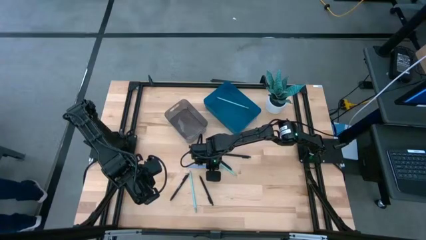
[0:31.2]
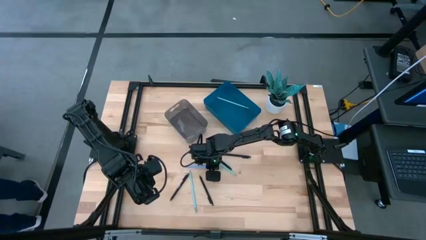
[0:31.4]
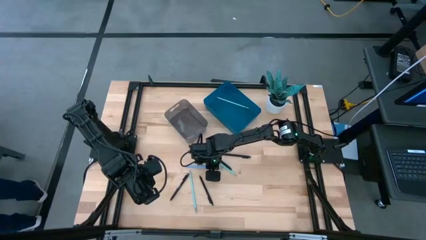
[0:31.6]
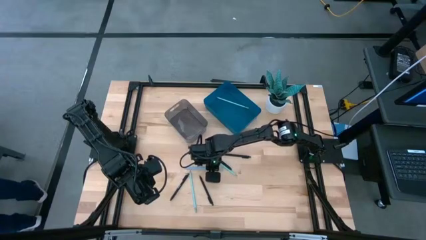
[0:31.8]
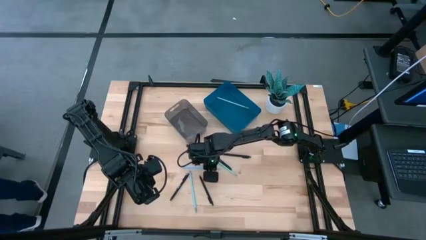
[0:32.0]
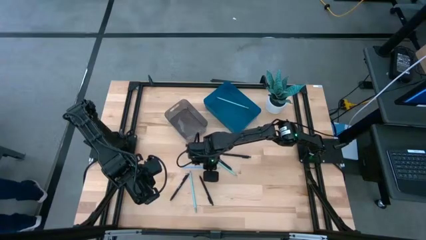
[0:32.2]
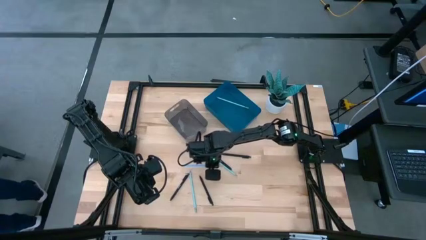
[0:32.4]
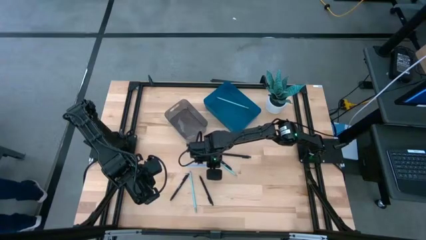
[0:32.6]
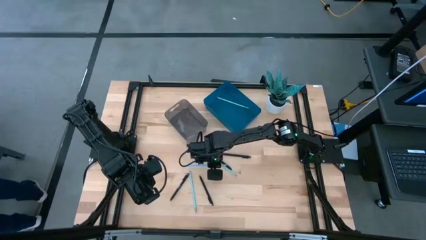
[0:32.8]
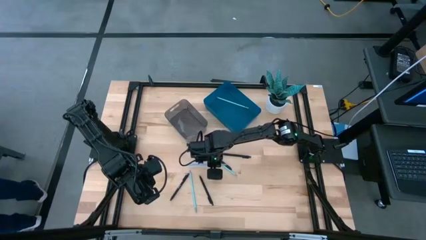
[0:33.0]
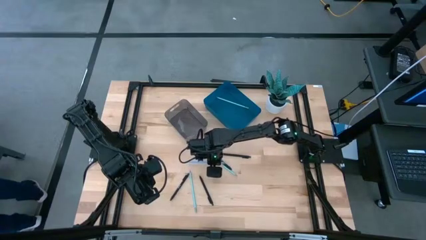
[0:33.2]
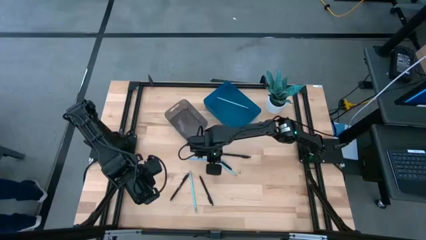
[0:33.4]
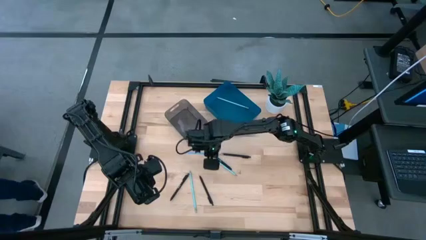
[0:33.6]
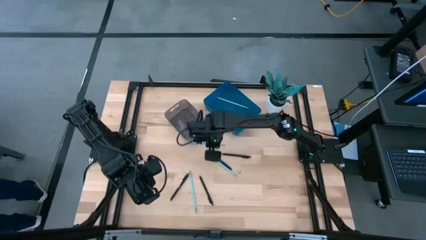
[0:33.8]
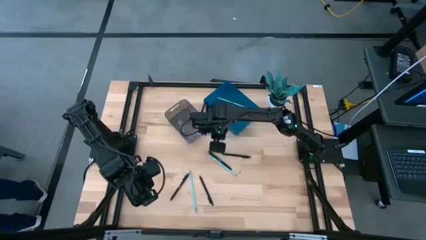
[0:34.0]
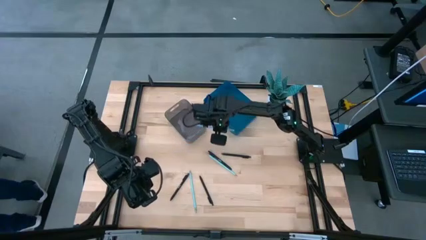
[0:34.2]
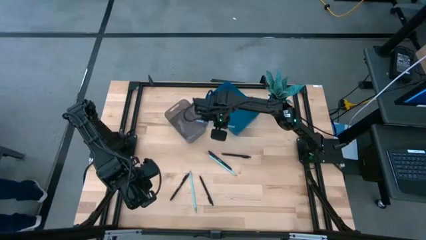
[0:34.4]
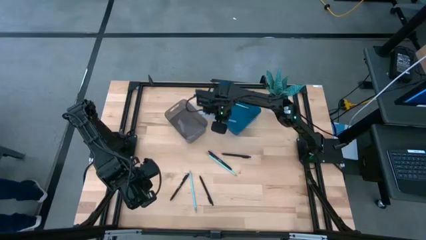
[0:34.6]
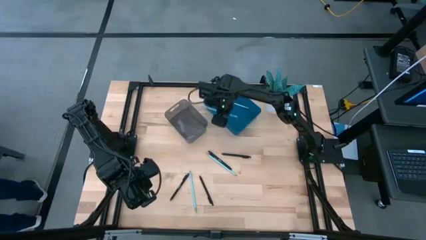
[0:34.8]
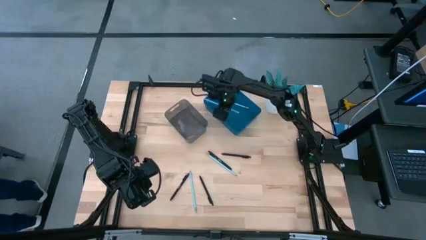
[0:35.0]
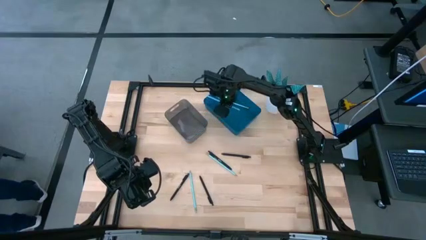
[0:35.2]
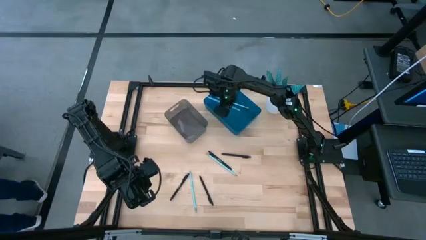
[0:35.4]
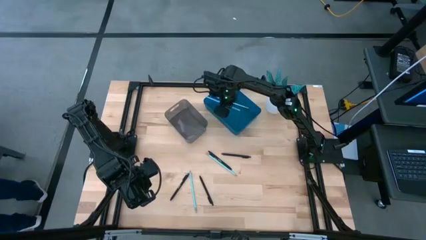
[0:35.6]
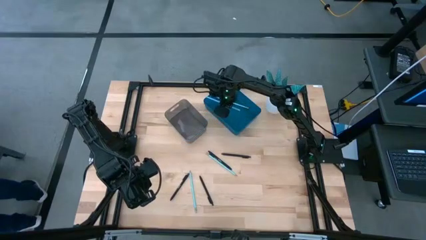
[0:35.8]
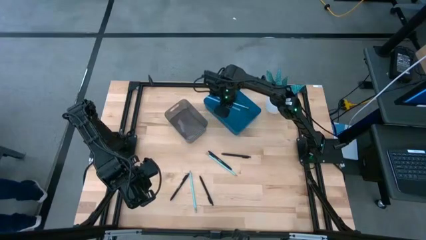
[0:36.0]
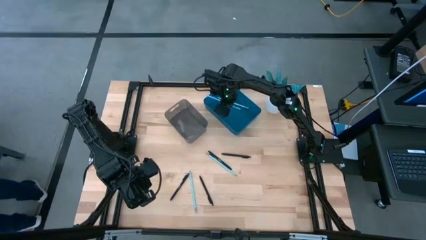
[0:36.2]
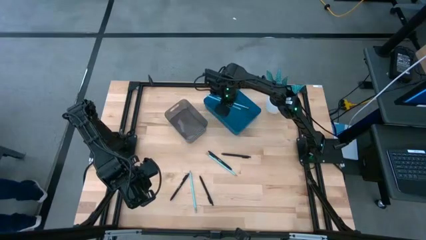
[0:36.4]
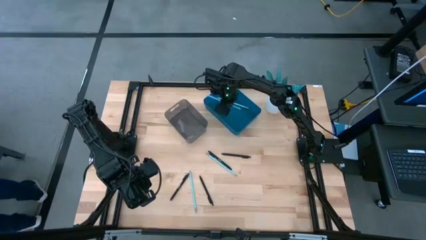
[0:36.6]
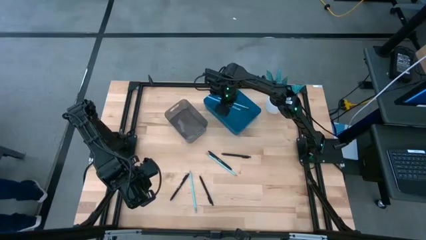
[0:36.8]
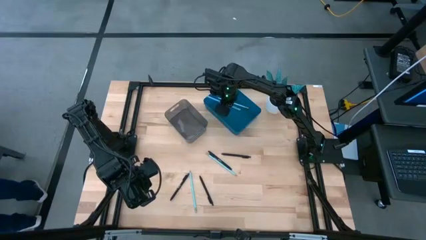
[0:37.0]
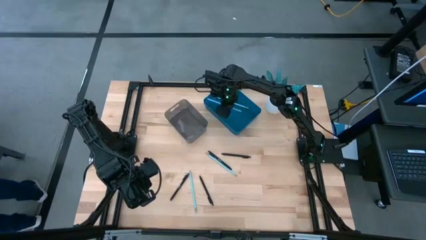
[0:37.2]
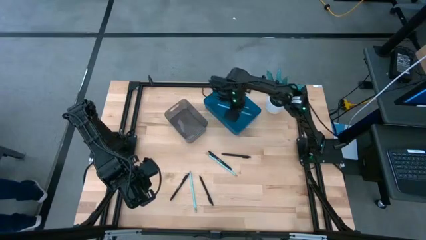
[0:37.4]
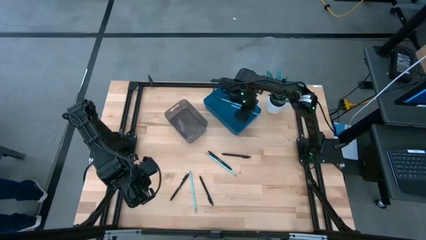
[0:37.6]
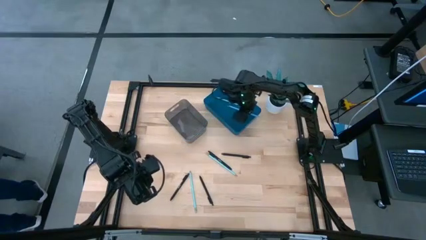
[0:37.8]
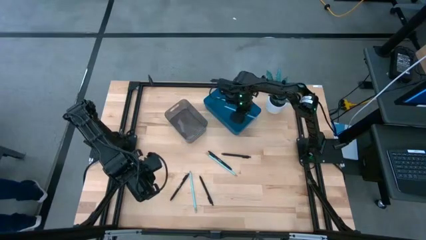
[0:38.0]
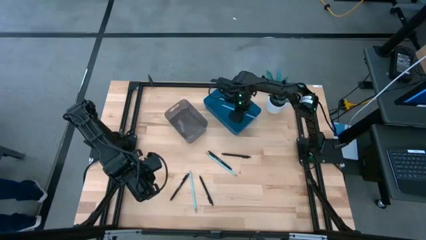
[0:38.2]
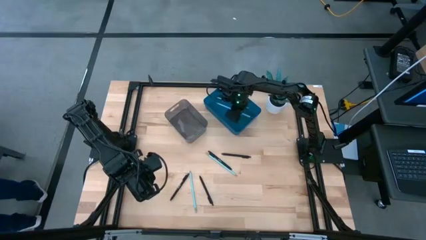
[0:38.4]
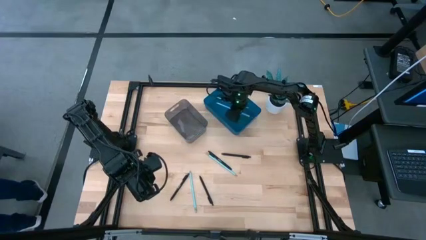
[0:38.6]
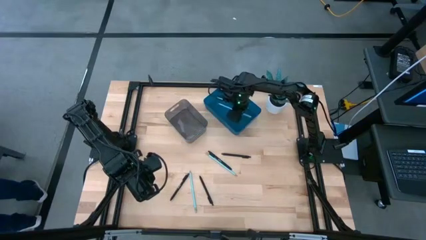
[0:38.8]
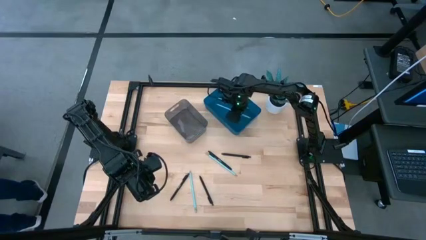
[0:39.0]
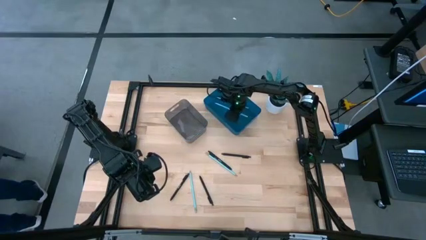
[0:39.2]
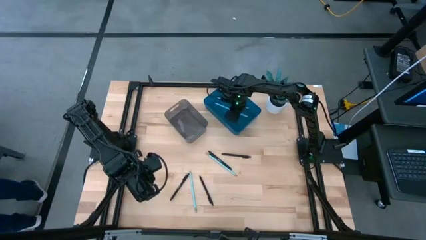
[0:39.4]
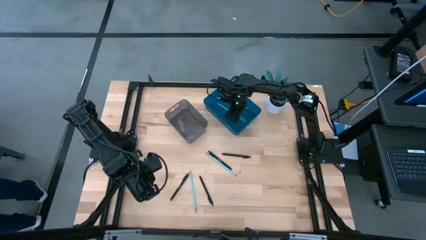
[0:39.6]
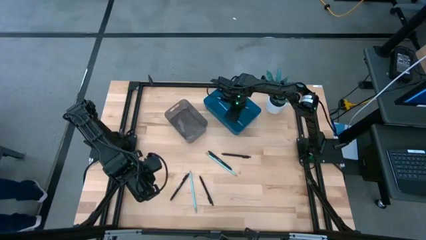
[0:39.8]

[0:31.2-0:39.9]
Task: Sort pens & pencils
Put the blue pencil into the blue bin

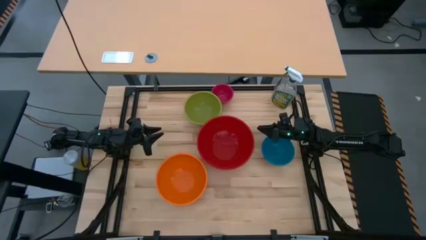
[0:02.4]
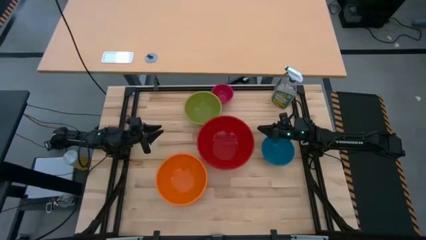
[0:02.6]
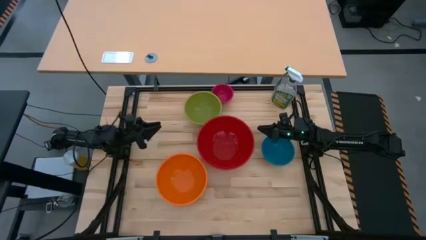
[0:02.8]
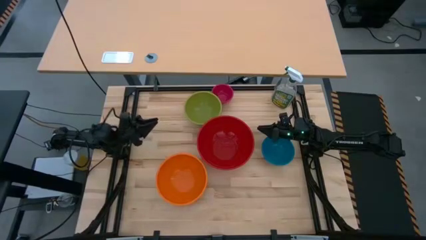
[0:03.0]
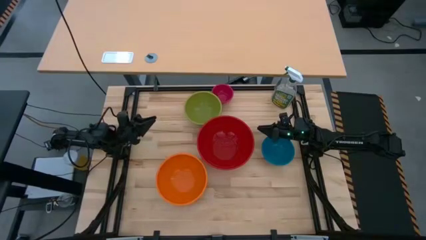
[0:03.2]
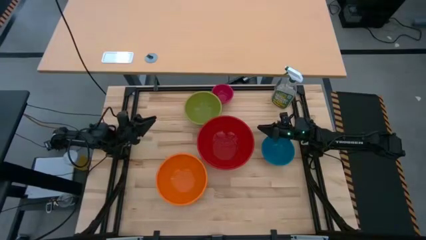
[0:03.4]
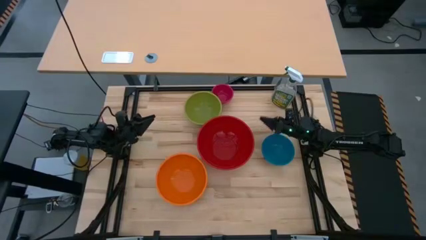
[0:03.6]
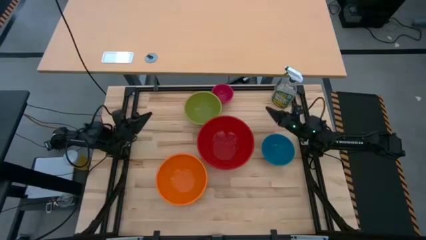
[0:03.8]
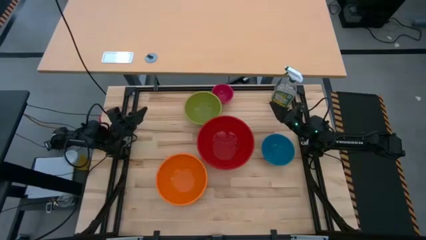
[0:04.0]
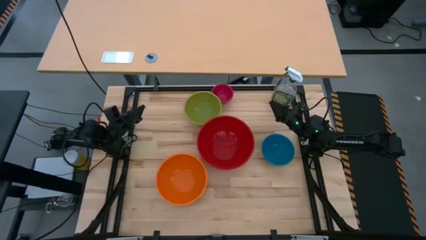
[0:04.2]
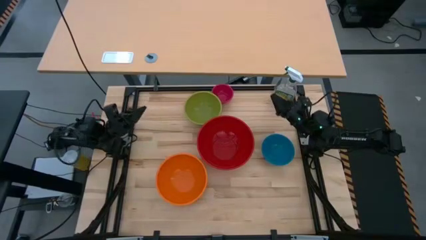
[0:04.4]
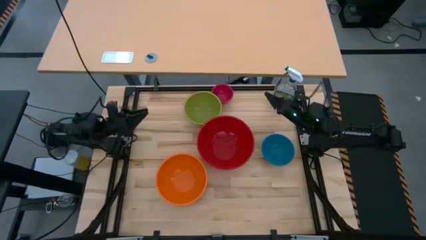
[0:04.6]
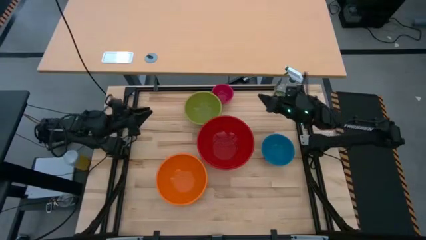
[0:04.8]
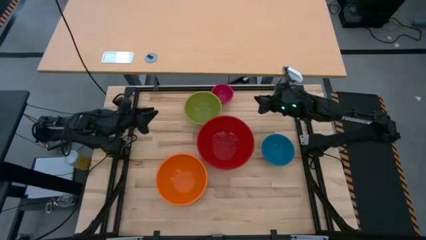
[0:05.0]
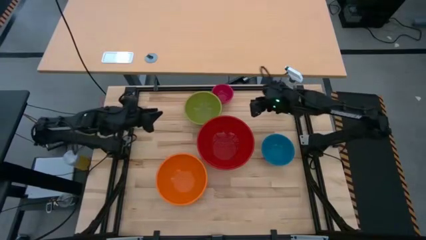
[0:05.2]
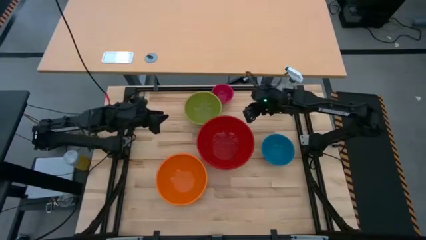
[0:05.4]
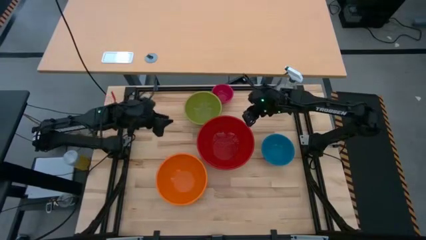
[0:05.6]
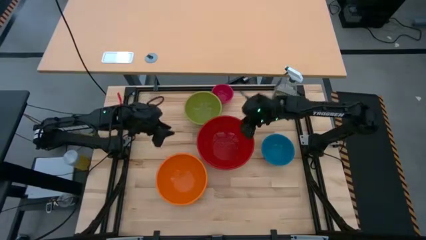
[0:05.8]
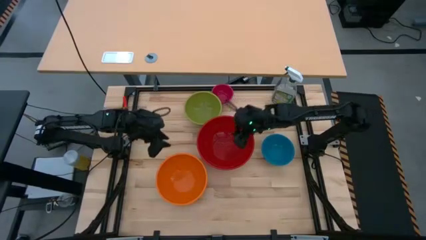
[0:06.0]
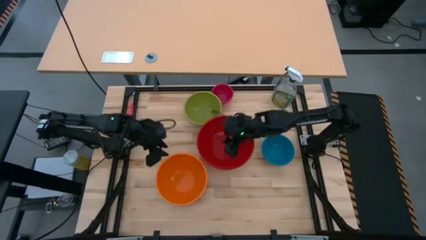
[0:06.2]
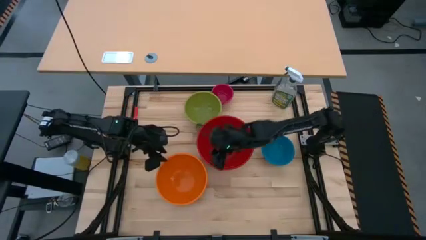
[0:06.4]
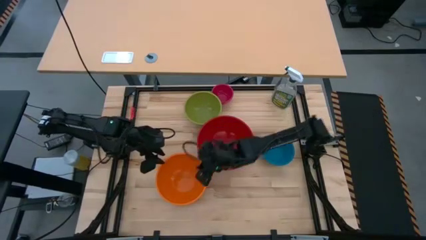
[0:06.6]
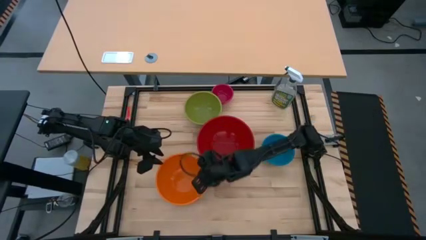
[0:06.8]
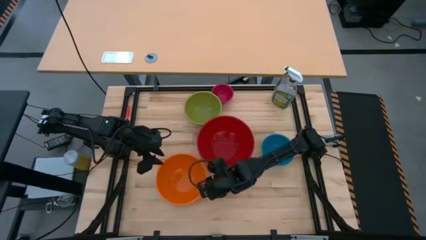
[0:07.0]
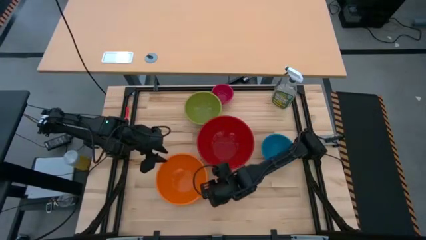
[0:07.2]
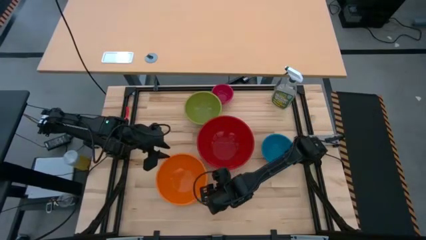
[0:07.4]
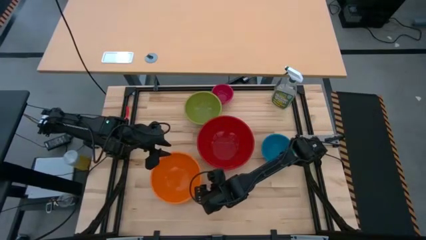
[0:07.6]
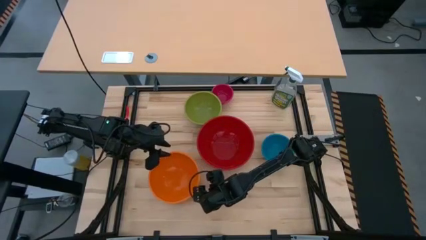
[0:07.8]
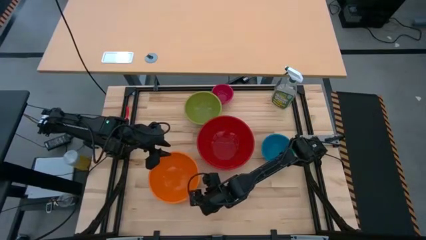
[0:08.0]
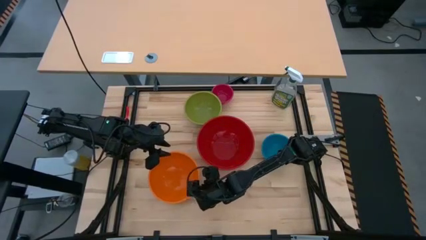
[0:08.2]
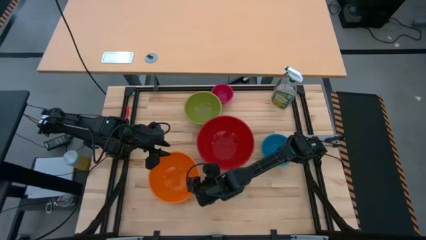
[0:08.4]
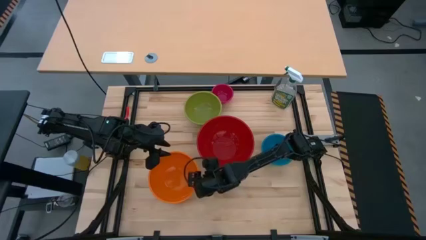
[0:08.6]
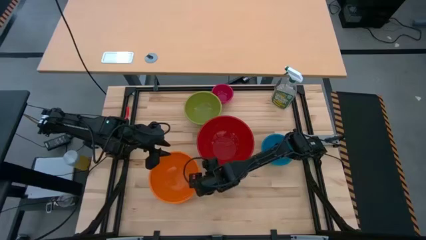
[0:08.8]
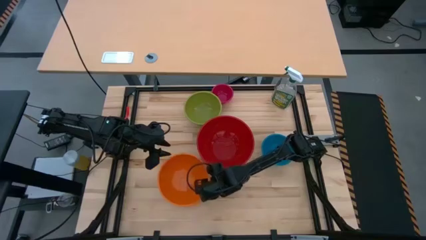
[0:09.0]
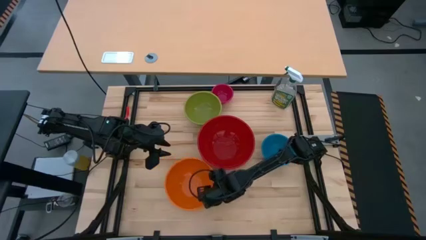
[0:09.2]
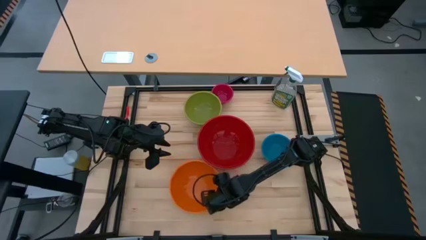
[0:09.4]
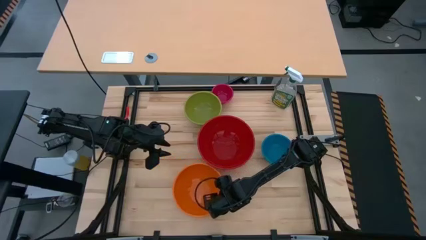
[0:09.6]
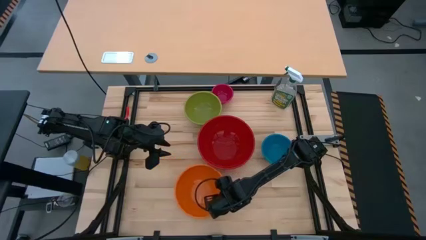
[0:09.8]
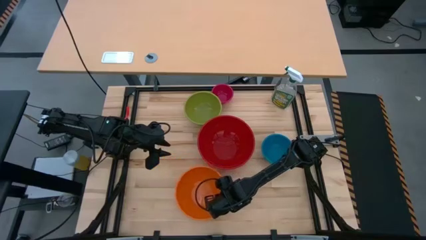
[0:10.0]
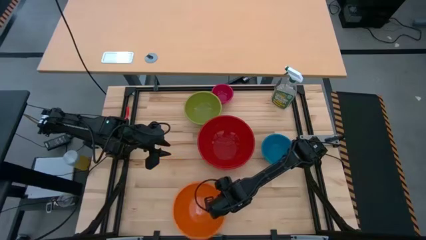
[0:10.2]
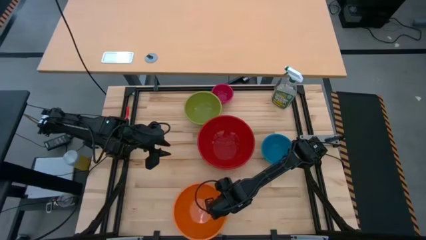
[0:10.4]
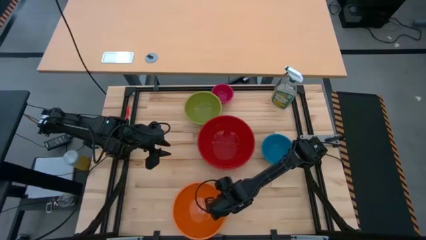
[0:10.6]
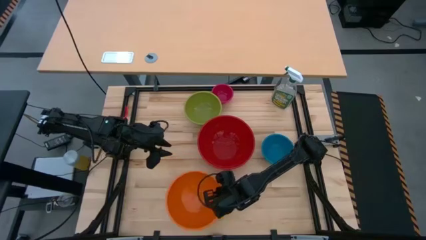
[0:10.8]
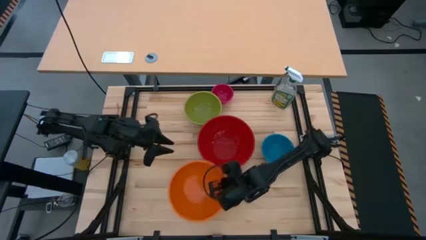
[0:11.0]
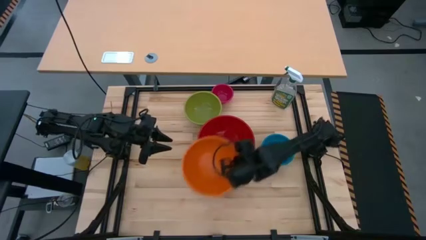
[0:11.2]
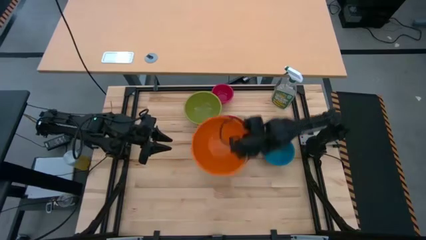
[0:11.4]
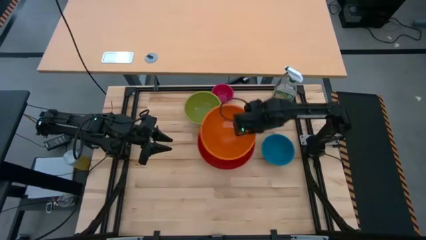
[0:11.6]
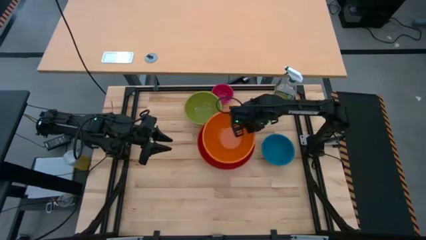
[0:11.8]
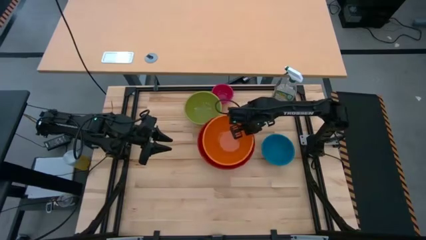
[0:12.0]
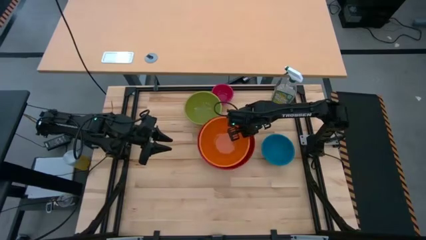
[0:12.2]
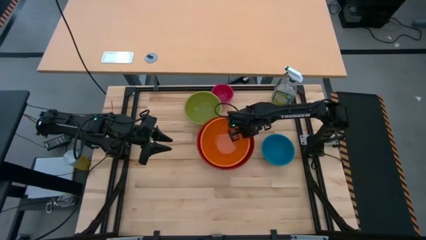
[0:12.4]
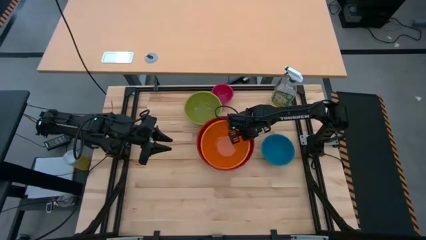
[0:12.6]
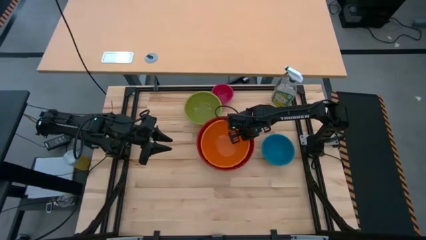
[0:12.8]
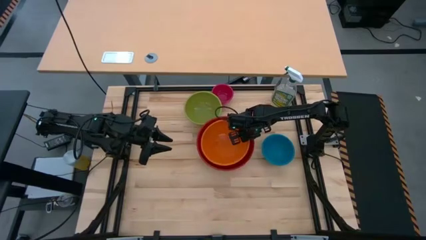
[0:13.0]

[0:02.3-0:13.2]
Task: Nest bowls inside each other by size order
Stack the orange bowl on top of the red bowl
